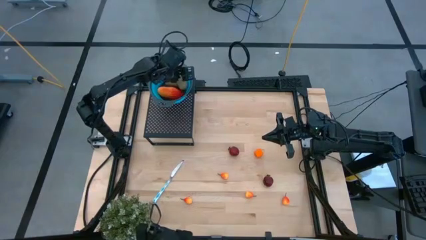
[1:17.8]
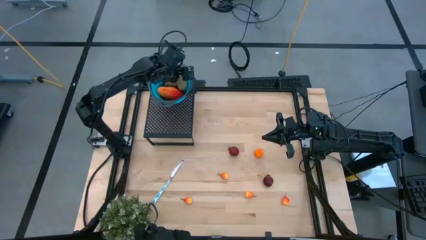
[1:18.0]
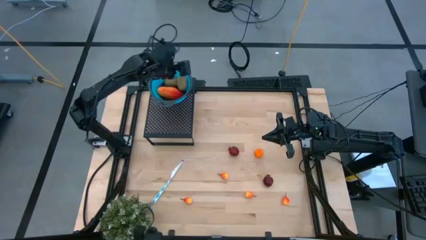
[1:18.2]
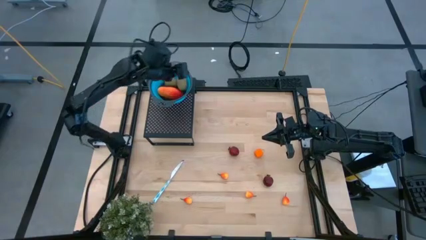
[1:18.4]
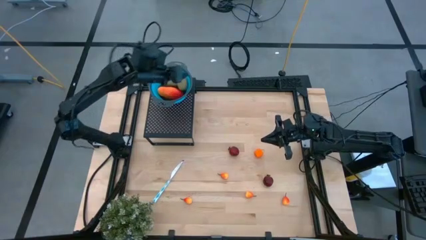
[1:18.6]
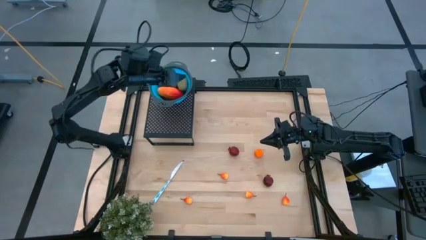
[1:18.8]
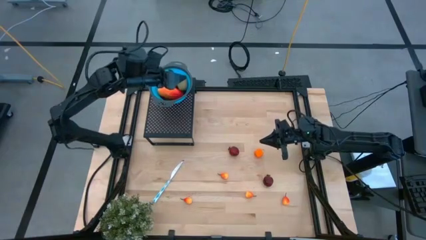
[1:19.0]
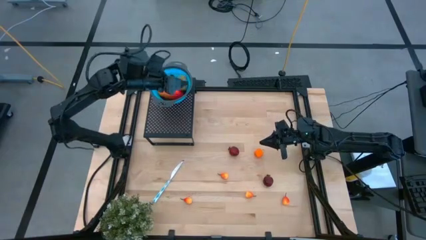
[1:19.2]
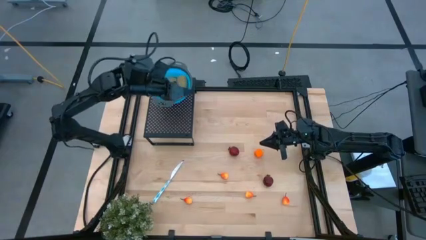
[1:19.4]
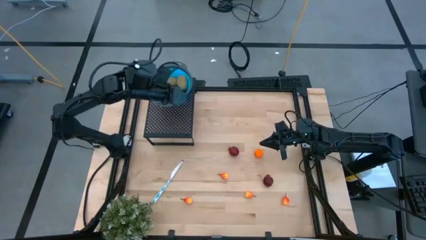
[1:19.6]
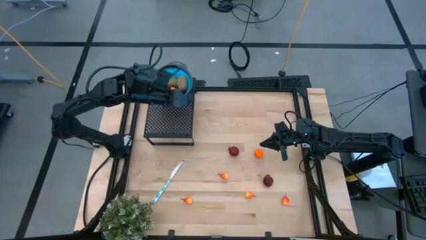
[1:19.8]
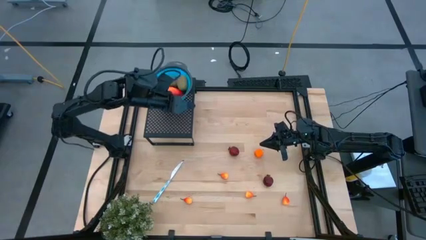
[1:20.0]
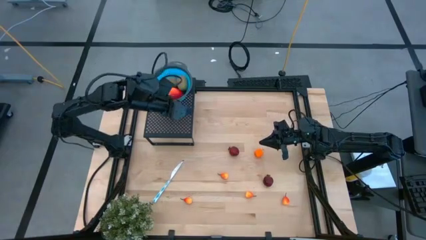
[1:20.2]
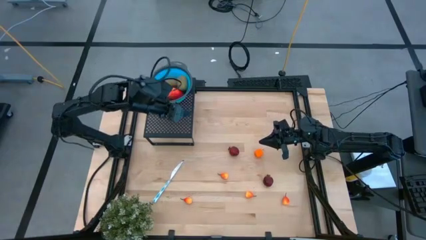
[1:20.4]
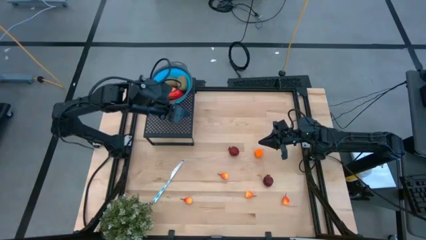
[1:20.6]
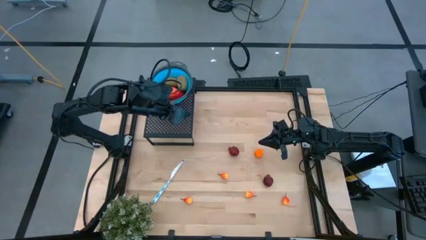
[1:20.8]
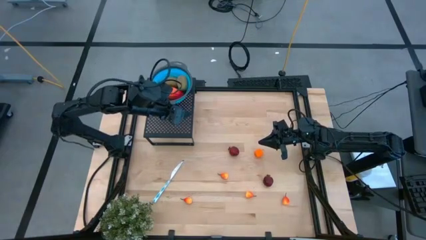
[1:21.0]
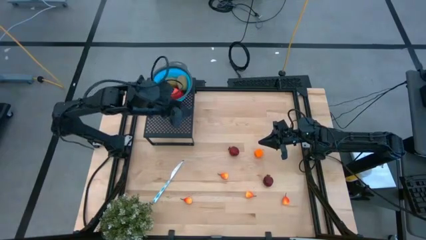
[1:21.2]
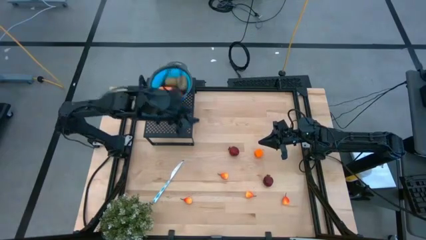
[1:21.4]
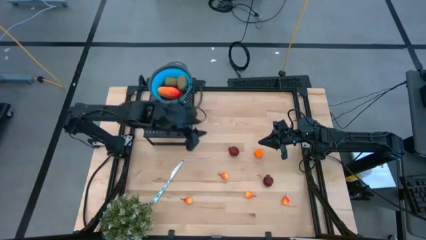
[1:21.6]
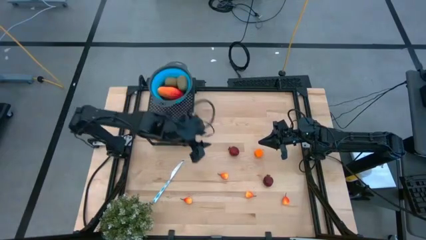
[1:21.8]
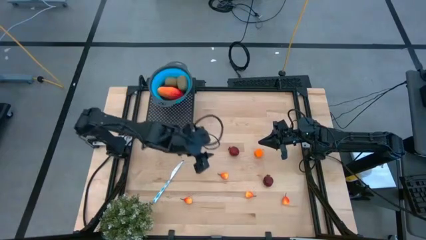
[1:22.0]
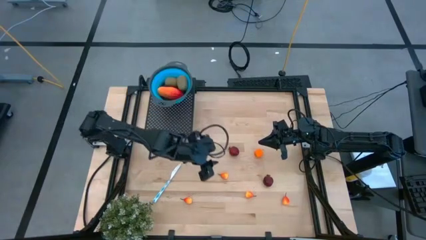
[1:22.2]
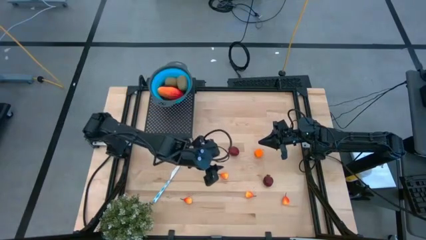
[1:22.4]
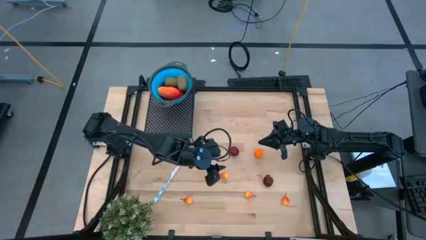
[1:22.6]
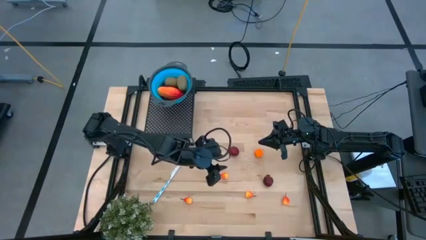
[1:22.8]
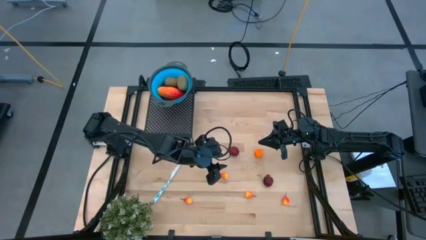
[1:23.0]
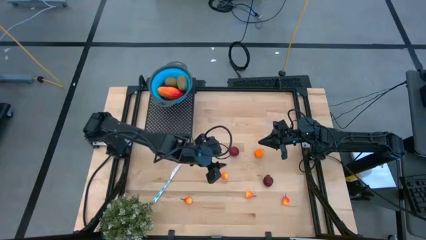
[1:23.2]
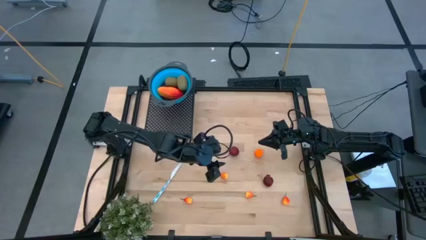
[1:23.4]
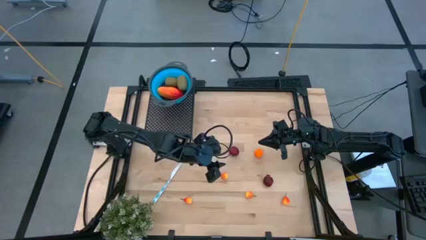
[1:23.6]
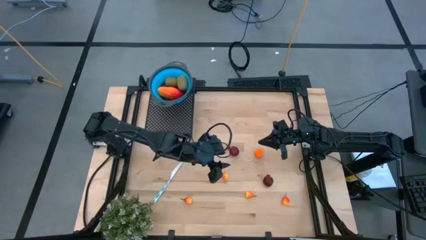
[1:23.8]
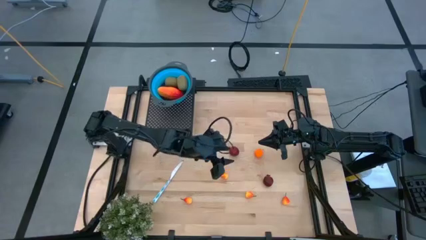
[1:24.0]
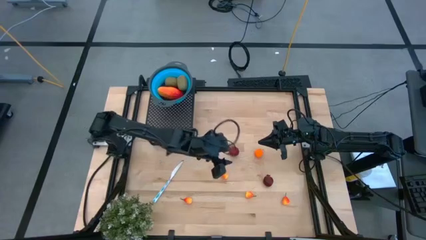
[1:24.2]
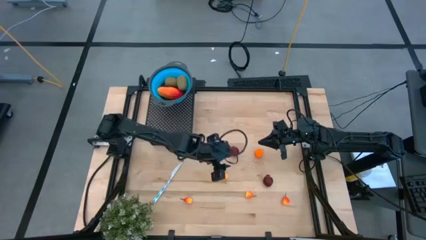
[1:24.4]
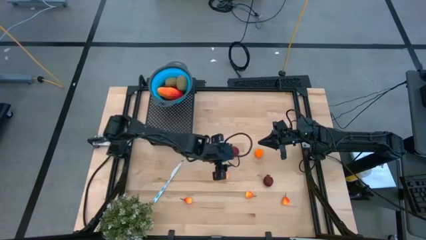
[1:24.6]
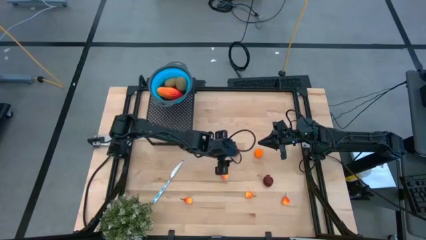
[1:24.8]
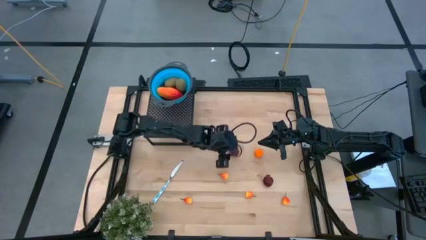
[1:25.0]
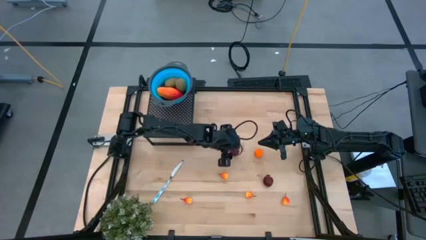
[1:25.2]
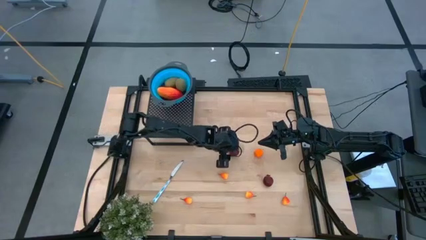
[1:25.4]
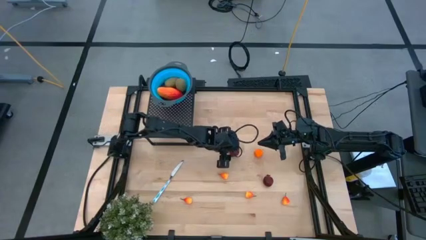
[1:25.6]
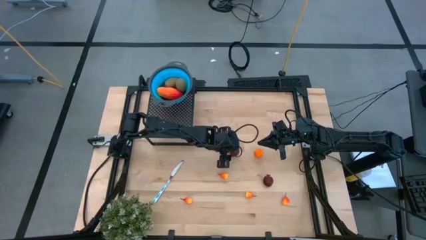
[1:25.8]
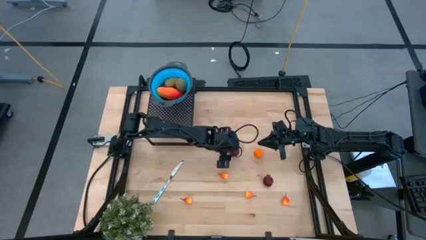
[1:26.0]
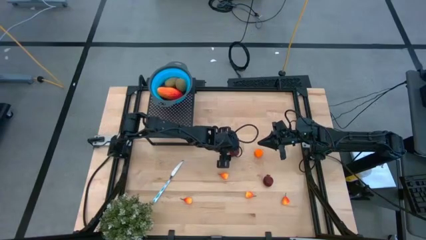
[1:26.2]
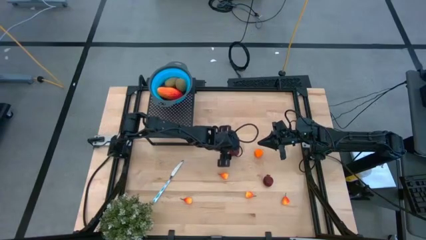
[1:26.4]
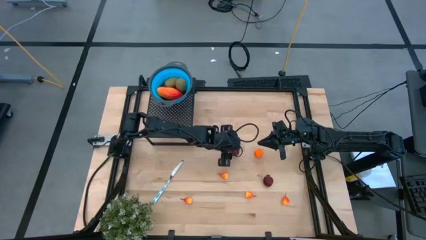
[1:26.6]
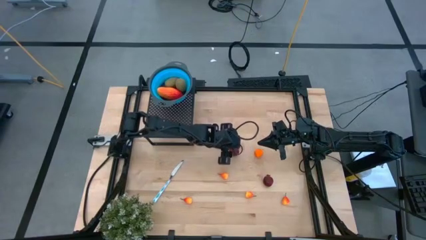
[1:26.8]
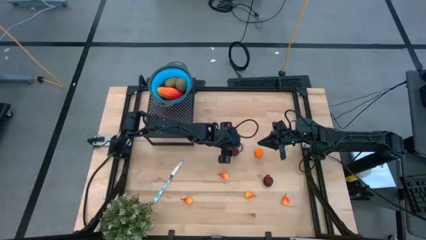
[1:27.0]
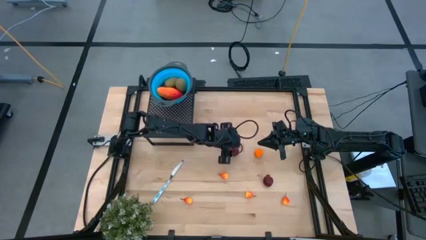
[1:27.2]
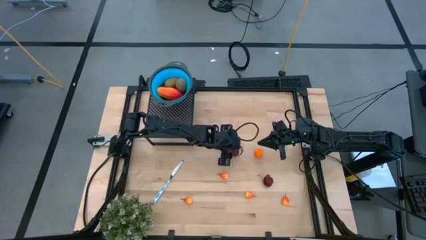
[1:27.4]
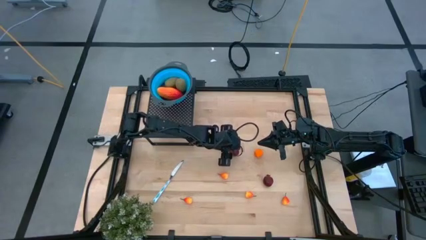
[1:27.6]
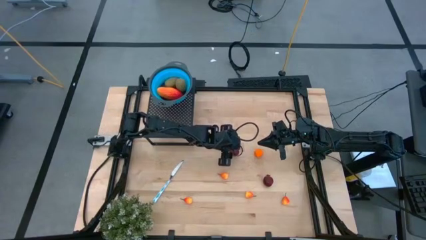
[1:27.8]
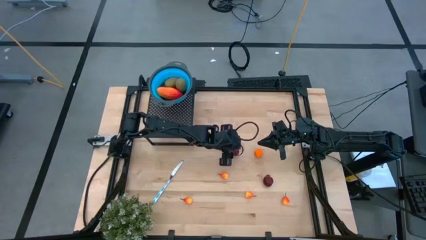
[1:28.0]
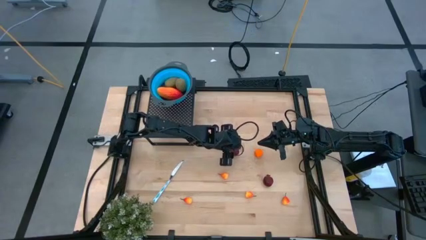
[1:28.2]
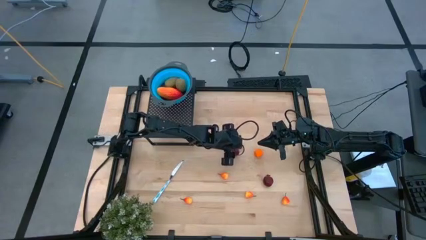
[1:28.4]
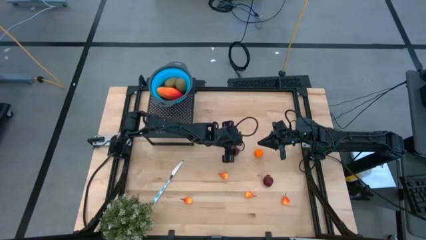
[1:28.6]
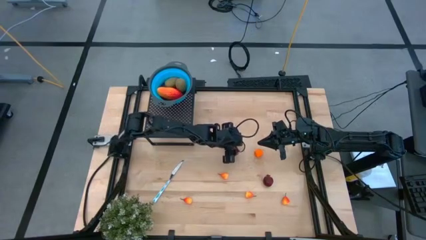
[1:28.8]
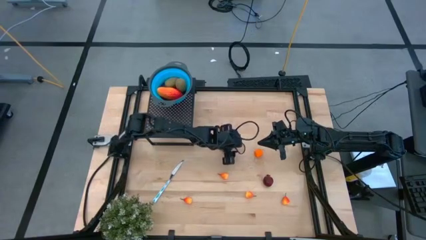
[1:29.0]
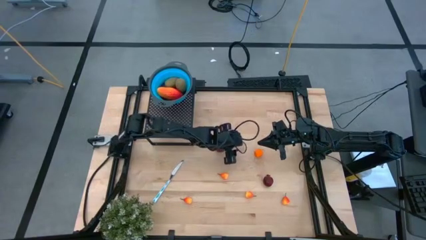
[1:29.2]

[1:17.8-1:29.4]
Task: Pick & Place Fruit
Put the red pomegranate into the blue strainer bowl on the shelf

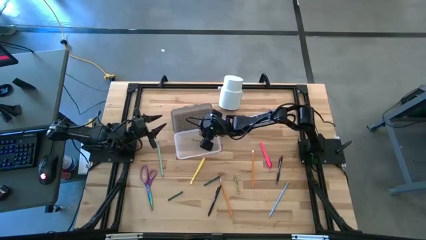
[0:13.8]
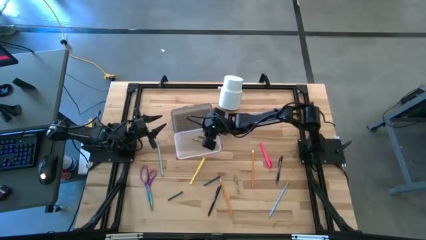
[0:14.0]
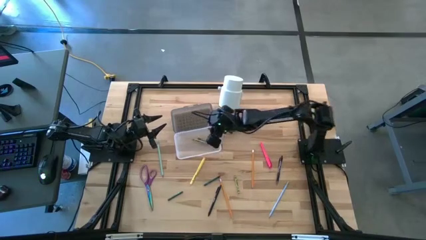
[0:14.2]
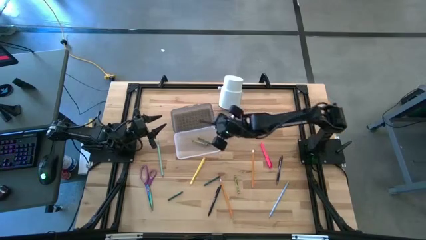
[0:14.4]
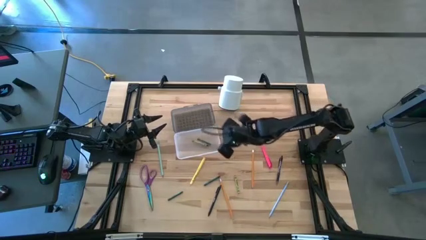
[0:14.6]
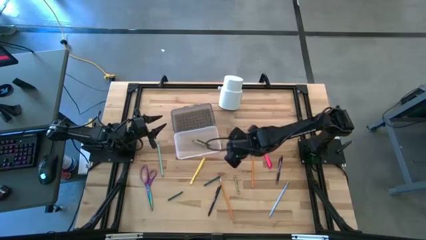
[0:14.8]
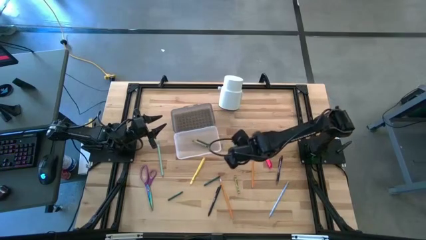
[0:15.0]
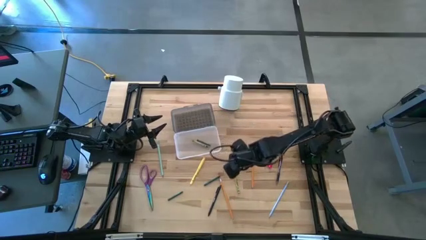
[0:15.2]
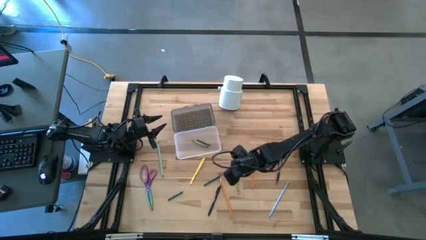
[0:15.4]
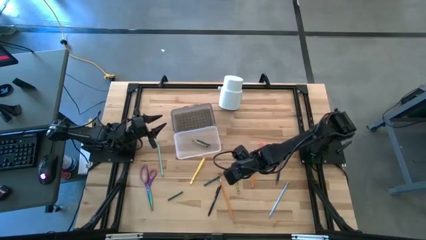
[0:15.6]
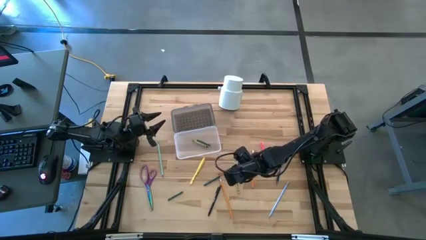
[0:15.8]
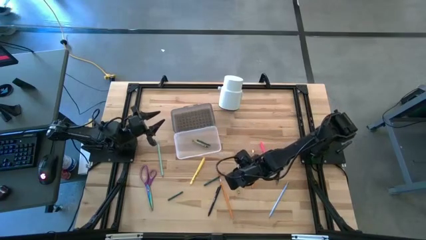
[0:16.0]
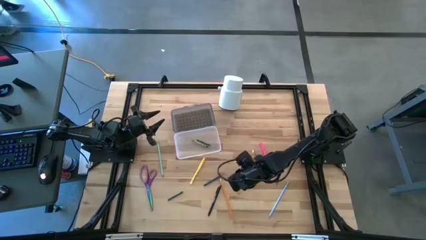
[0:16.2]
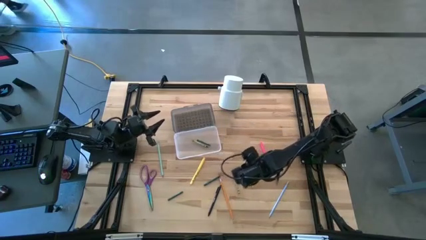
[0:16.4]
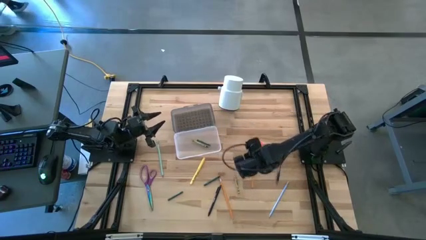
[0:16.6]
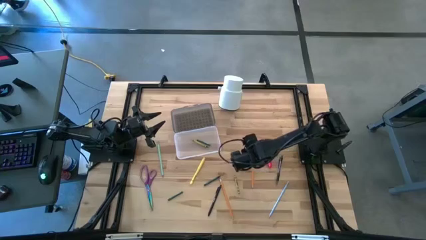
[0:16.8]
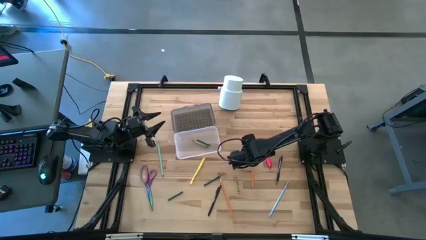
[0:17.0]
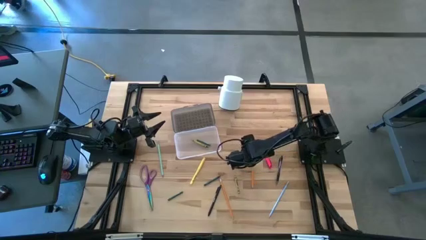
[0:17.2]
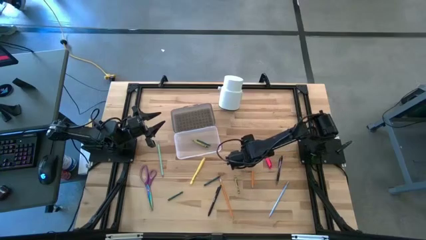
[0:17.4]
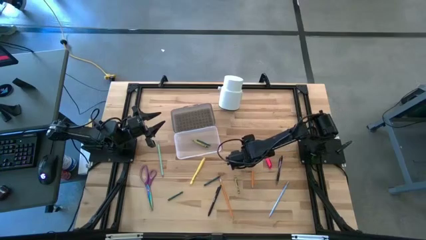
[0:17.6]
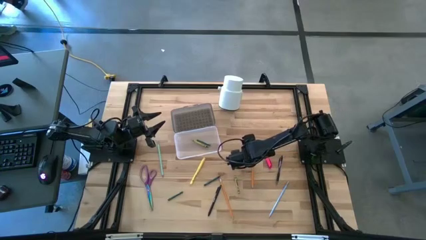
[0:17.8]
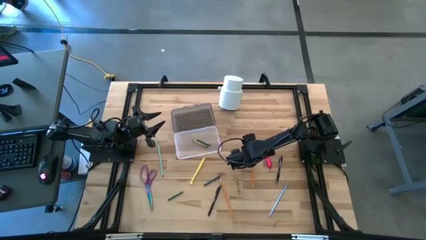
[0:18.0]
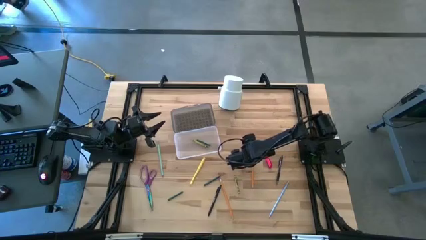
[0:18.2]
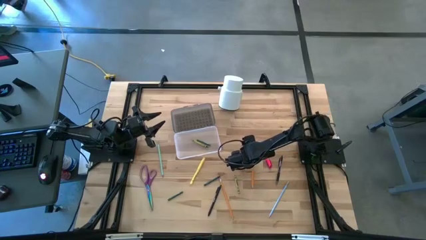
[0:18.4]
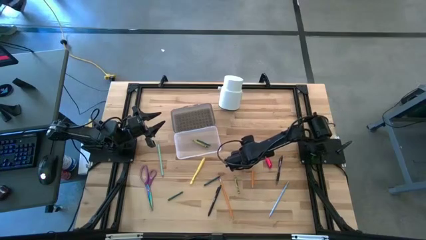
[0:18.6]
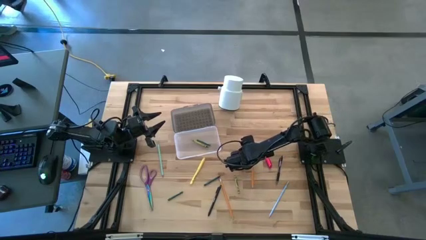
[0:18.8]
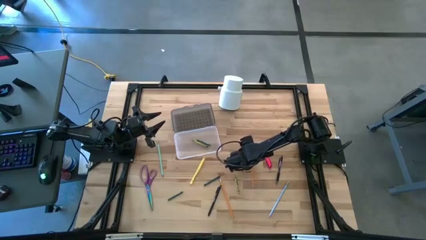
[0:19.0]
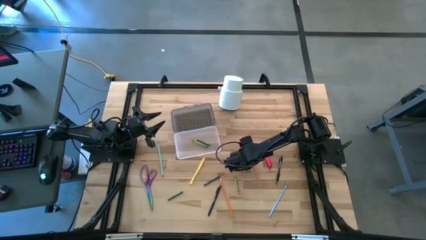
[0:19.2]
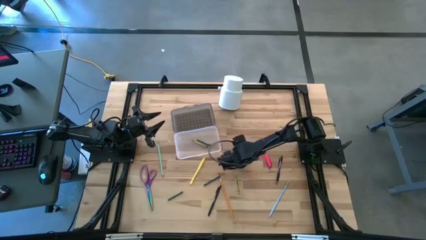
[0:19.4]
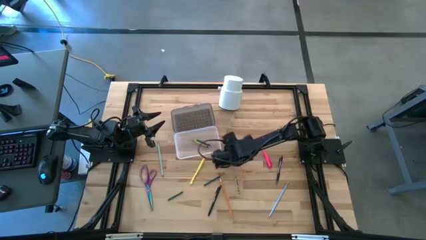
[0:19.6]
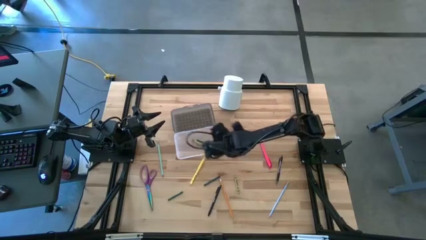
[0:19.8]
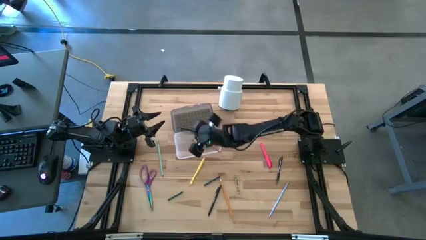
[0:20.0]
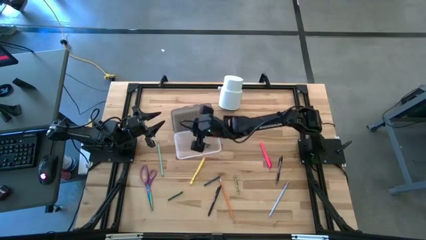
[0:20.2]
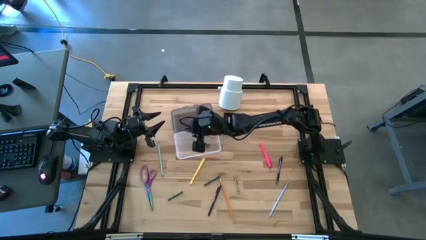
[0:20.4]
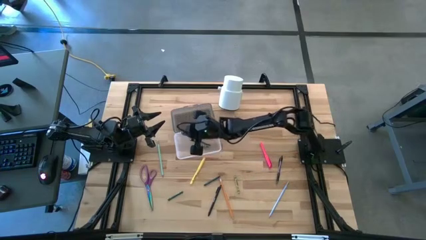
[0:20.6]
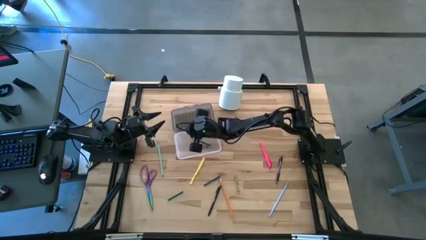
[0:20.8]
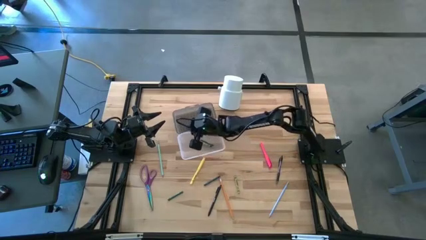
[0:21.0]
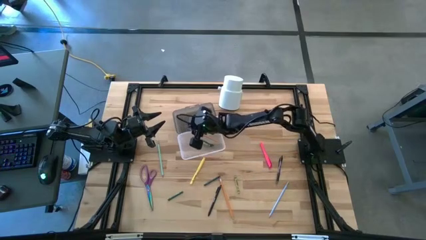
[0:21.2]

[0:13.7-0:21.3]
Task: Pick & place school supplies into a supply box
Put the right yellow pencil into the black supply box
